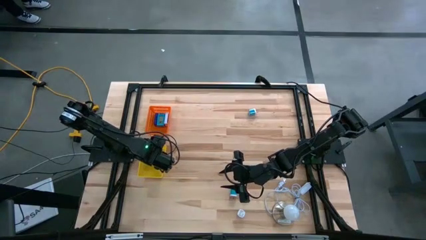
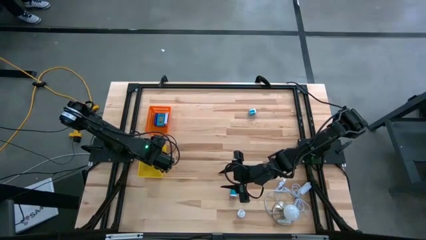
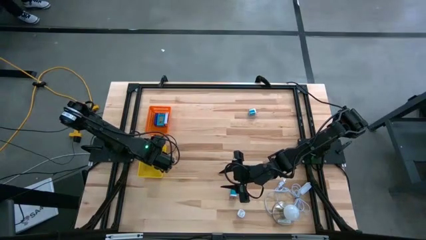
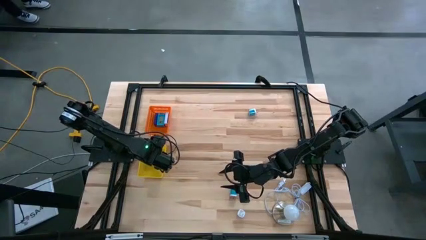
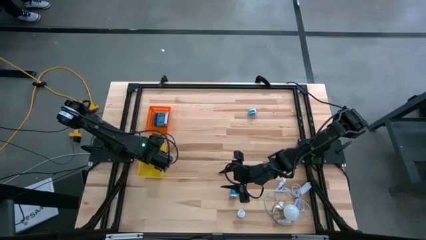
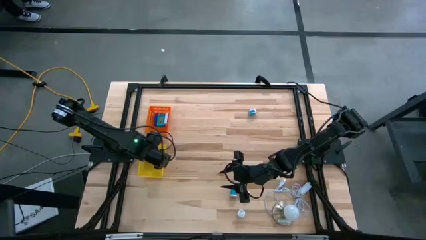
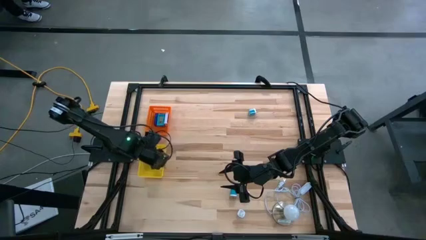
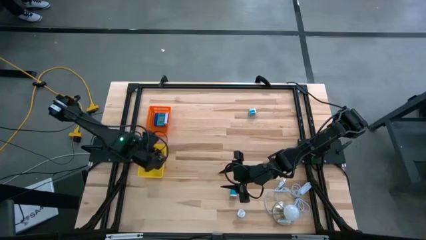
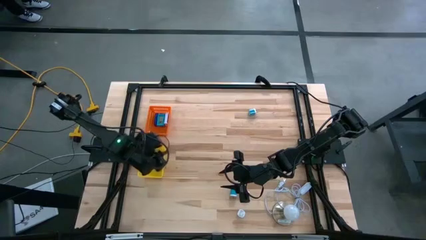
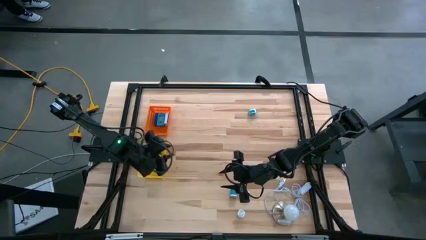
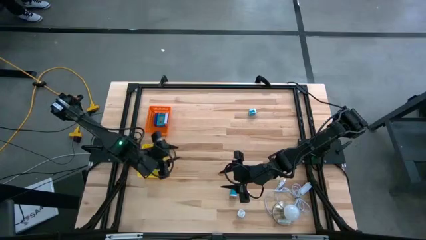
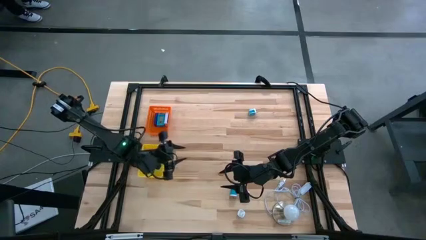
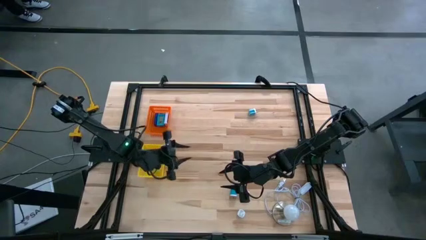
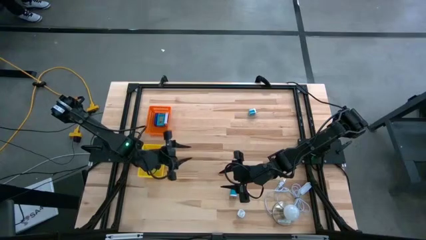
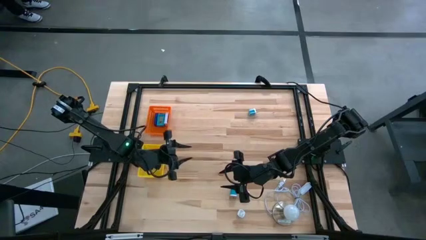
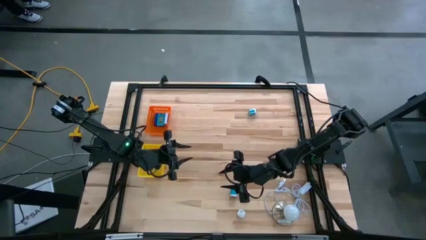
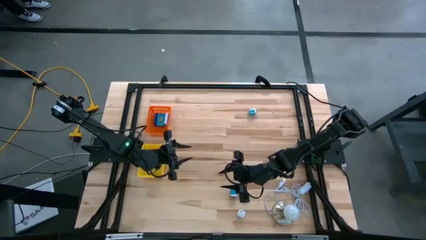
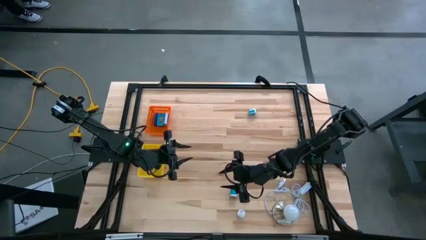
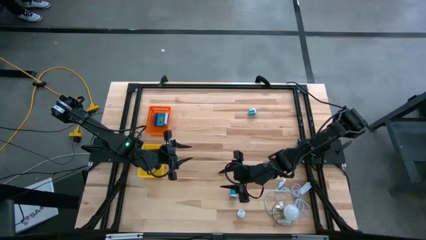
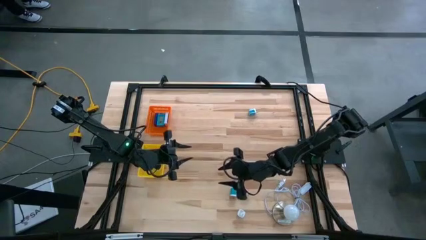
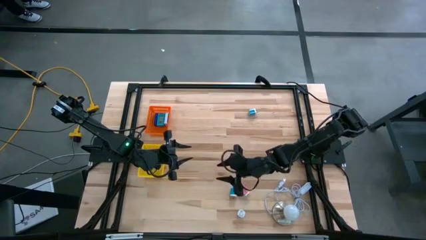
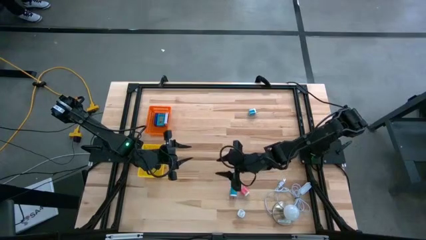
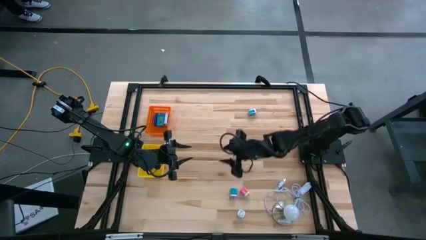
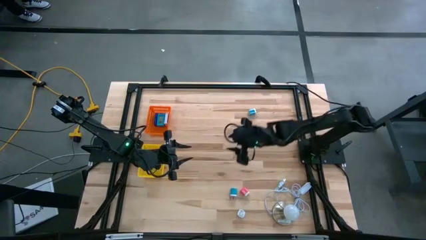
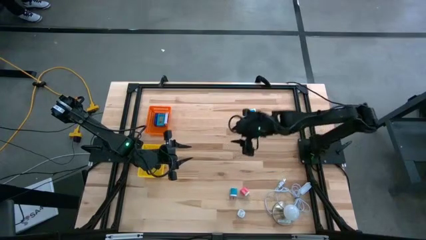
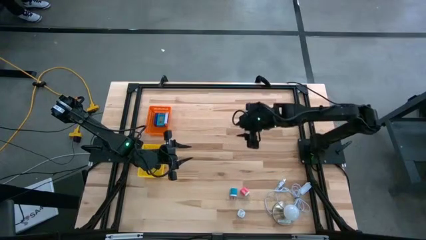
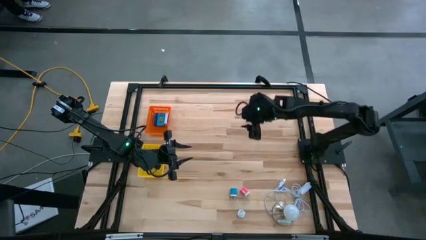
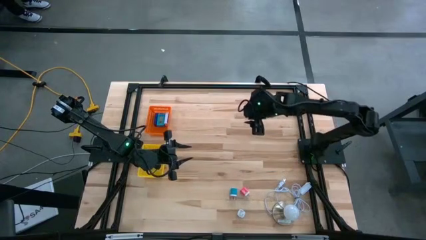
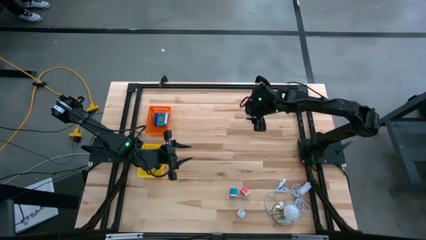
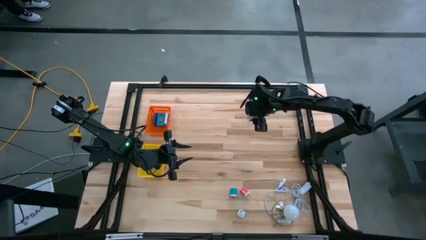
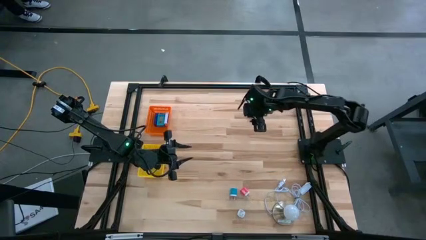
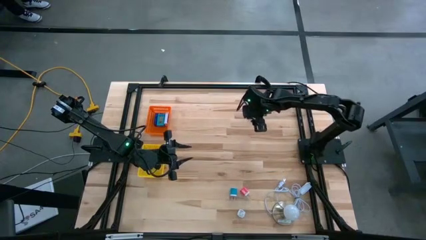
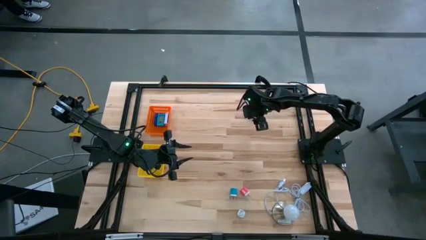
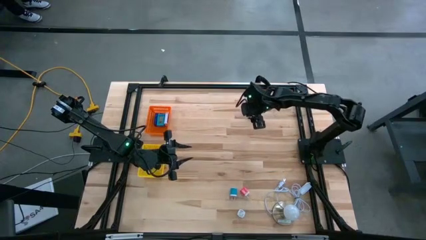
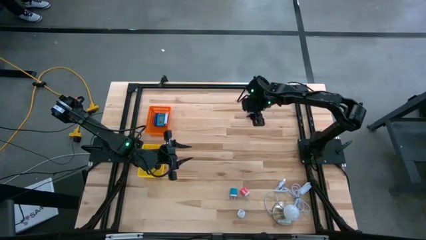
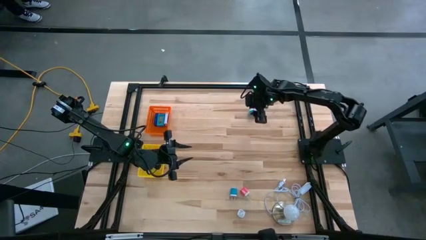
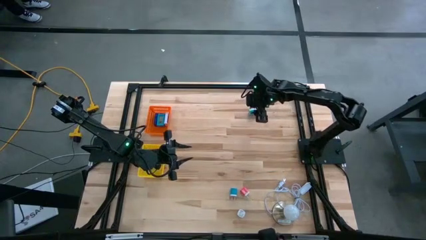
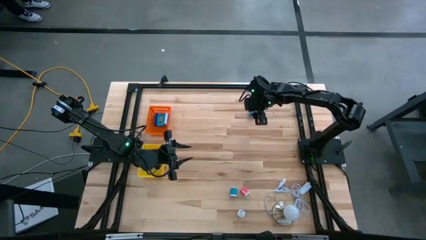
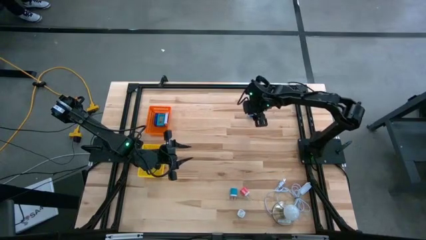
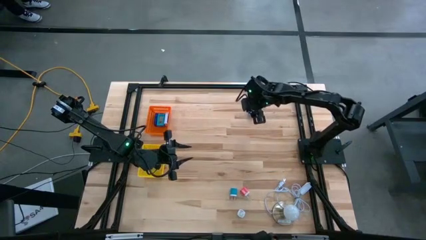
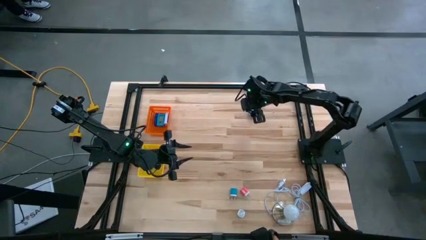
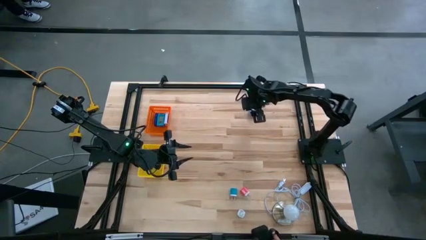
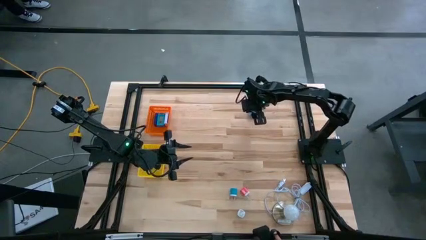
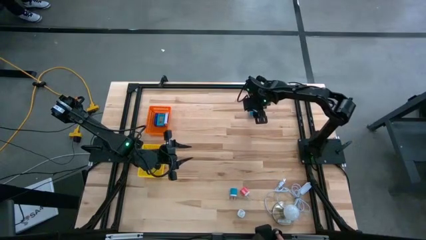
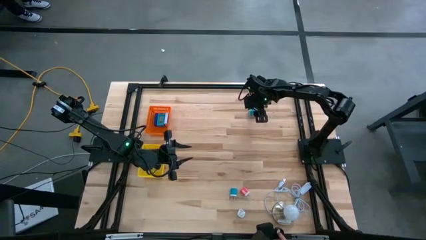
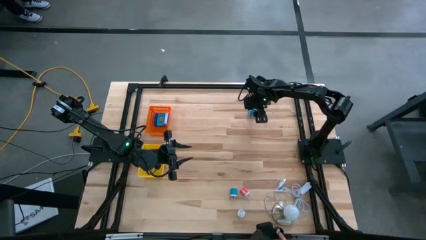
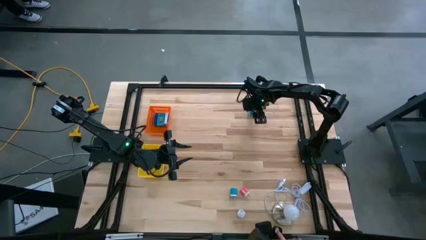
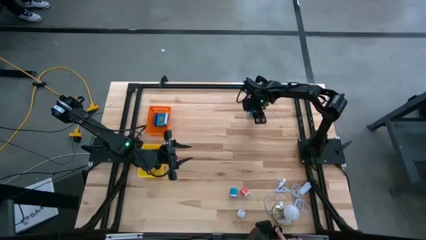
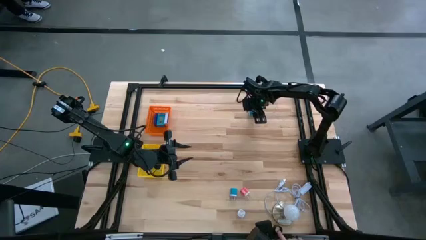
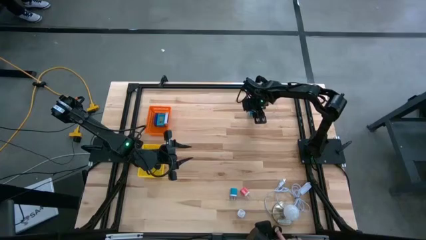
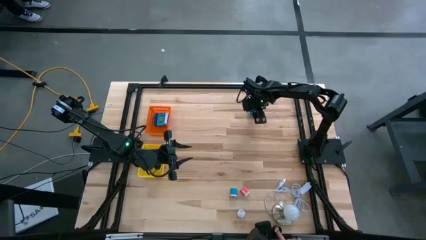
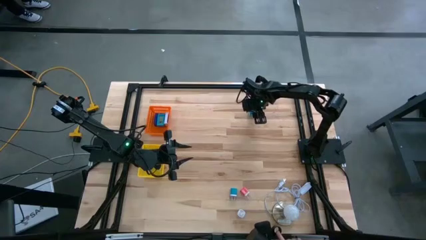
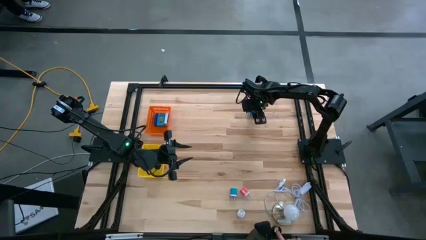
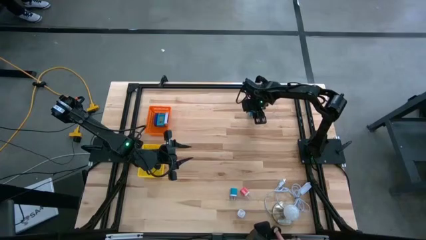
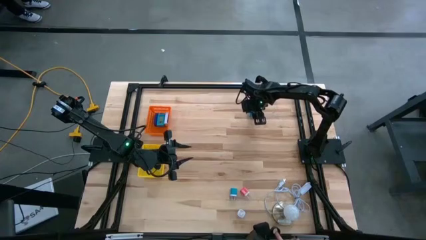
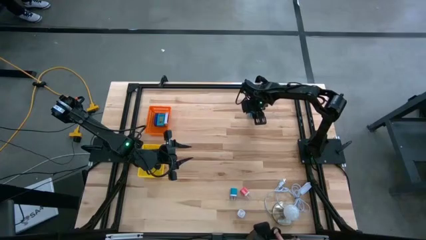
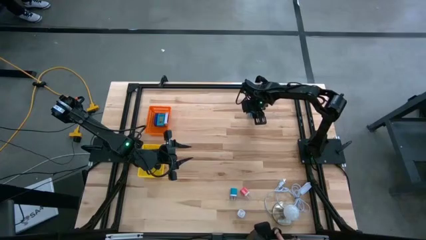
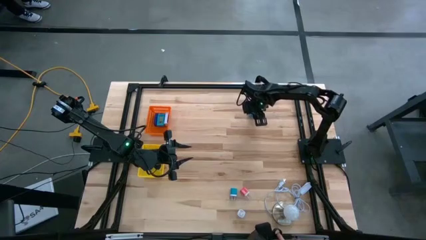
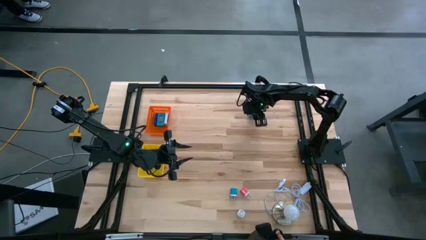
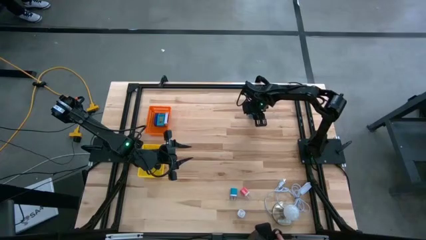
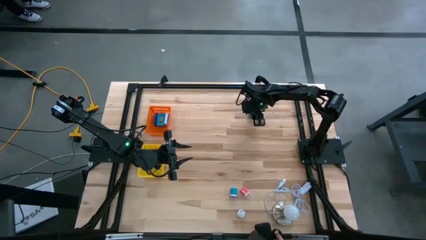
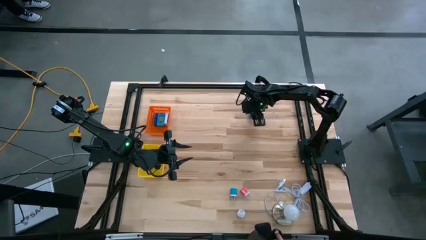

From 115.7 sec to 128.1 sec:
Task: Pick & Place Office items
Put the top blue charger adapter into the yellow basket

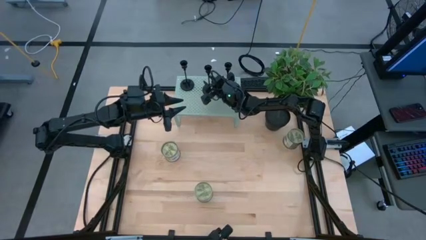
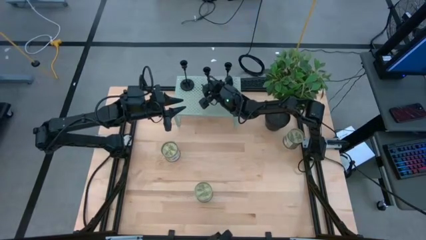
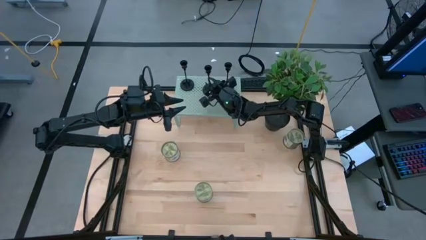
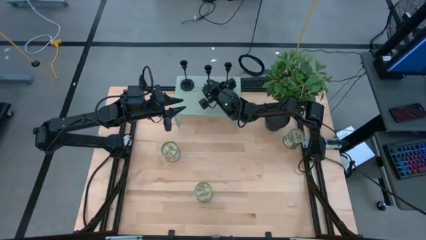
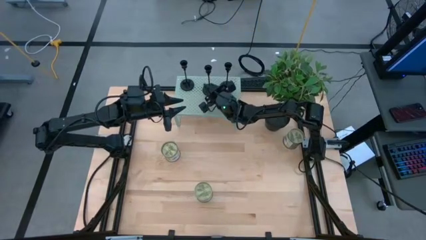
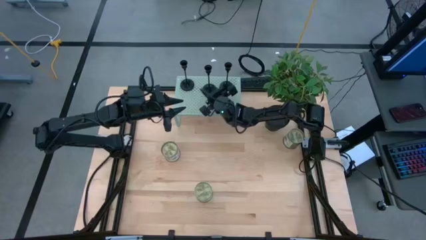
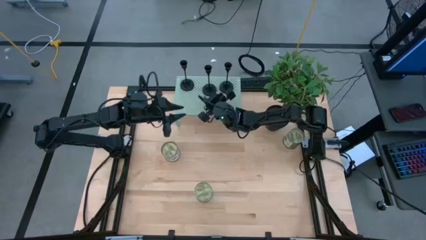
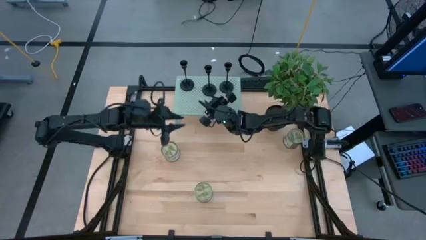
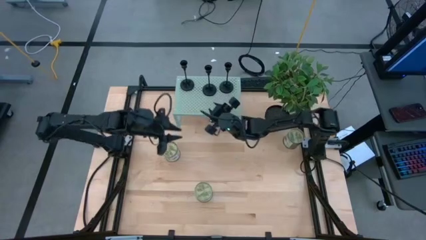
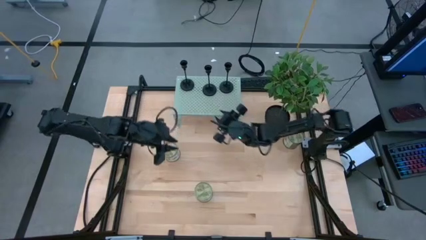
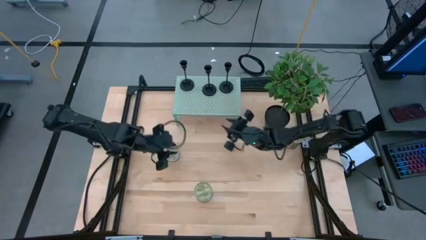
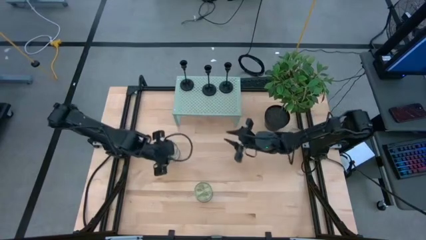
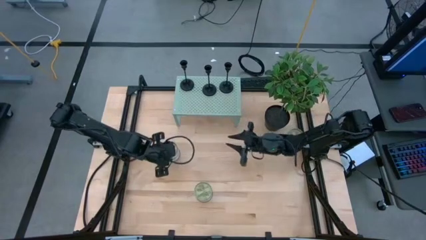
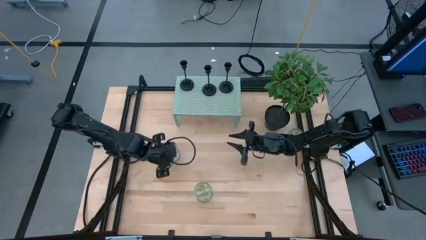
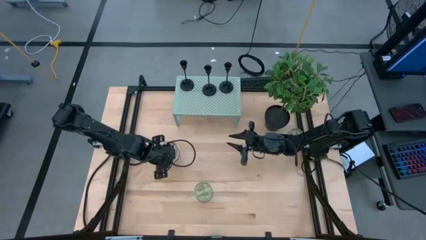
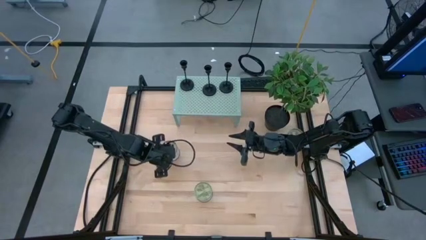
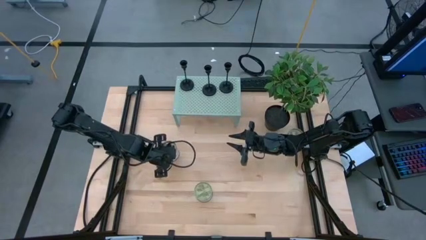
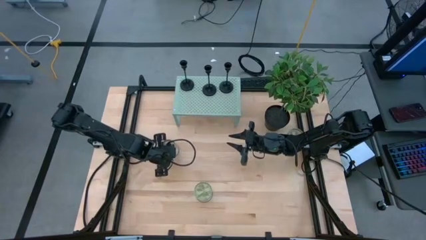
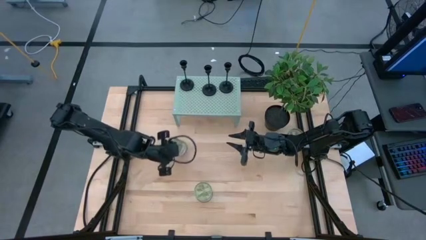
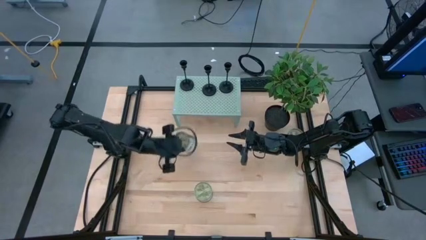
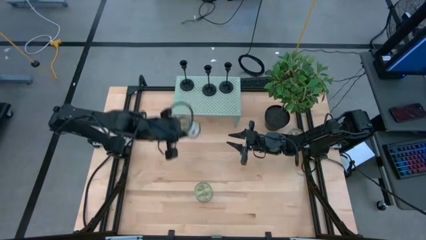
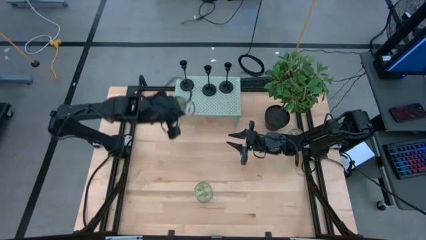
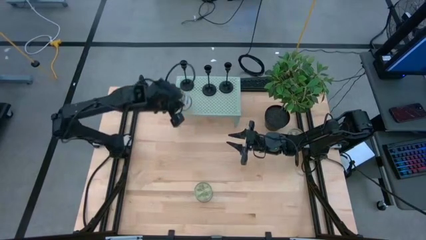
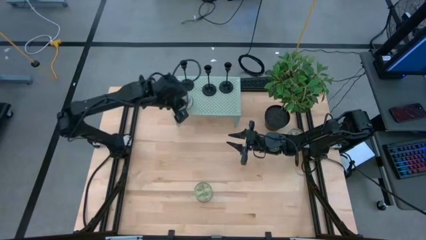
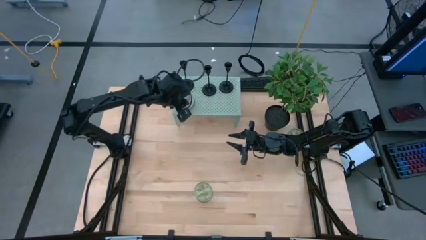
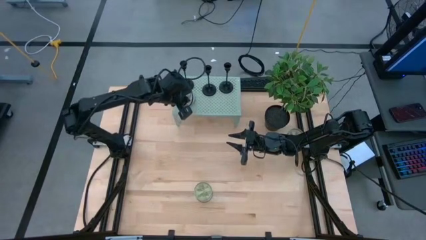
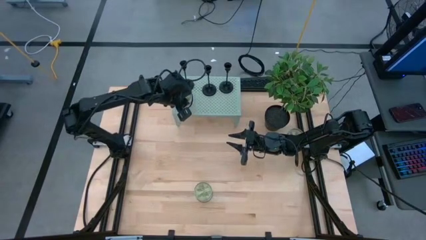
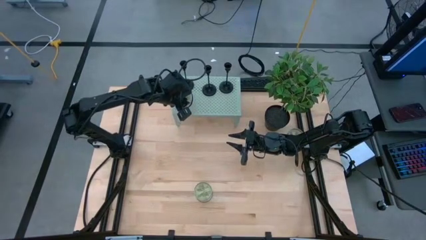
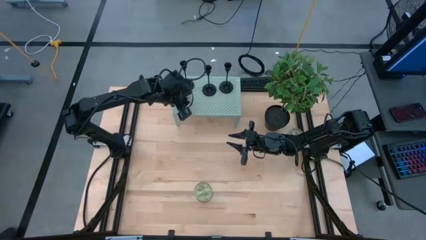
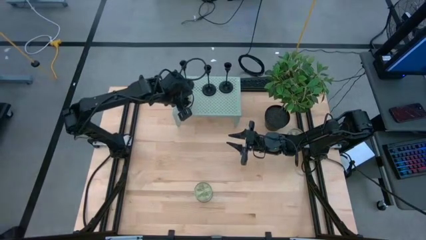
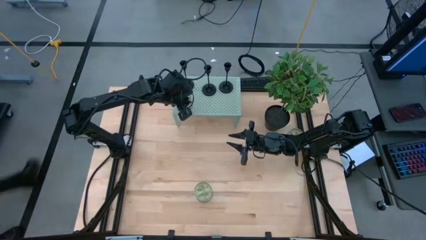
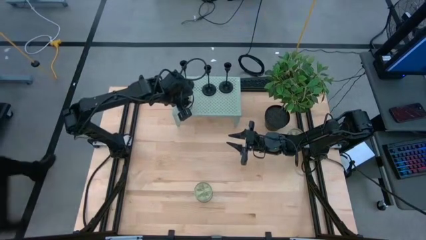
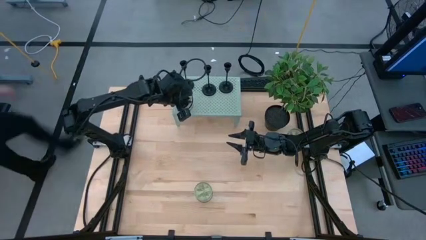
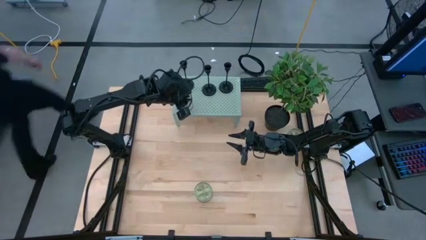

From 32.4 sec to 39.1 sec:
Task: Pick & Place candle stick holders
Put the left scented candle on the shelf
